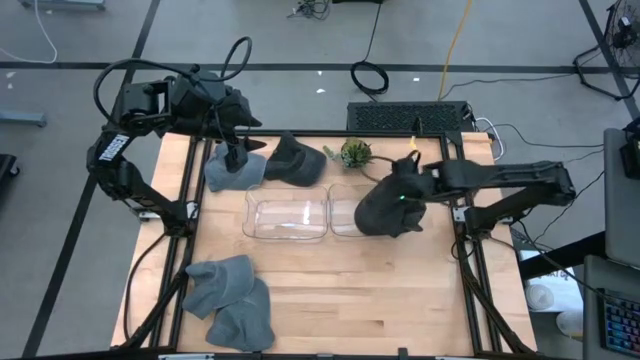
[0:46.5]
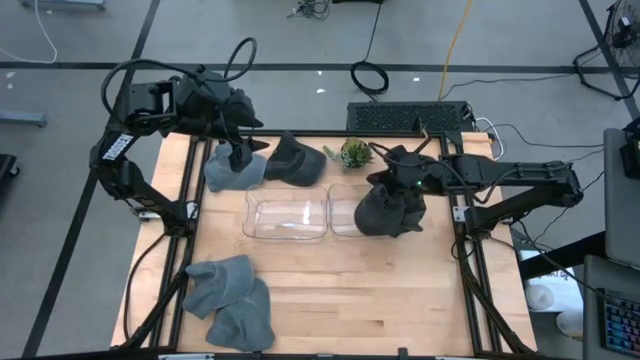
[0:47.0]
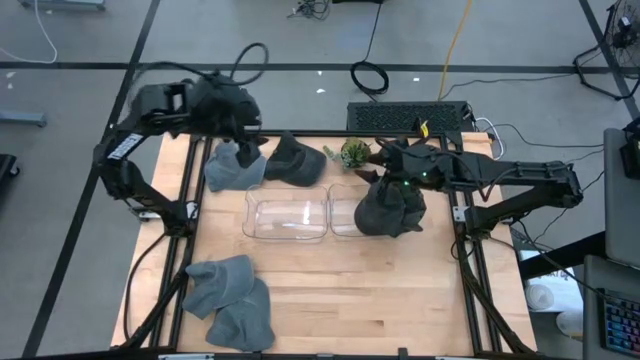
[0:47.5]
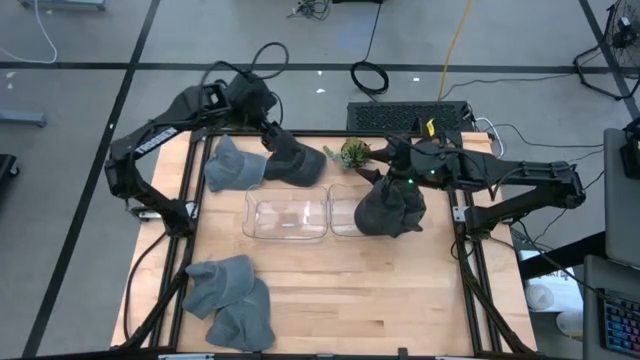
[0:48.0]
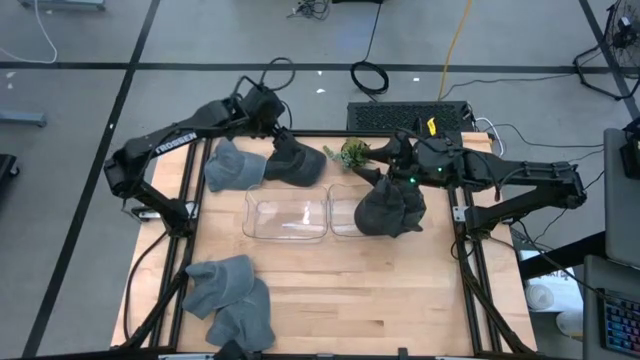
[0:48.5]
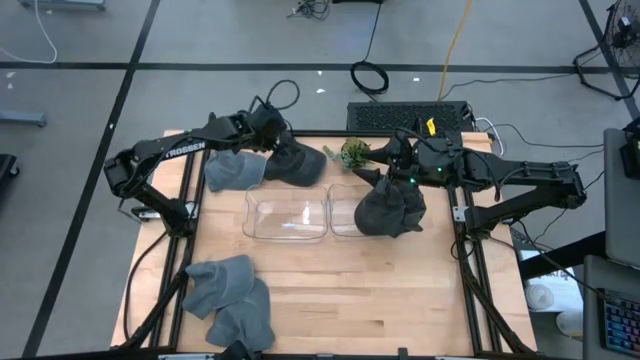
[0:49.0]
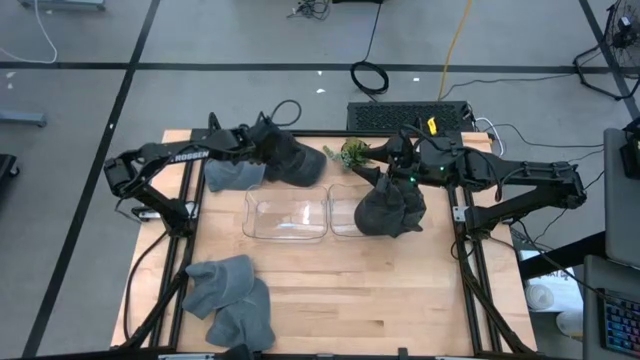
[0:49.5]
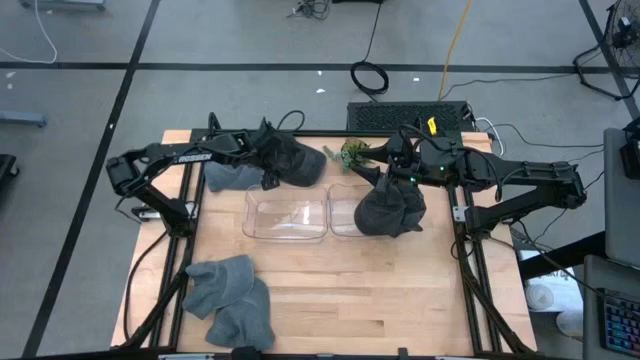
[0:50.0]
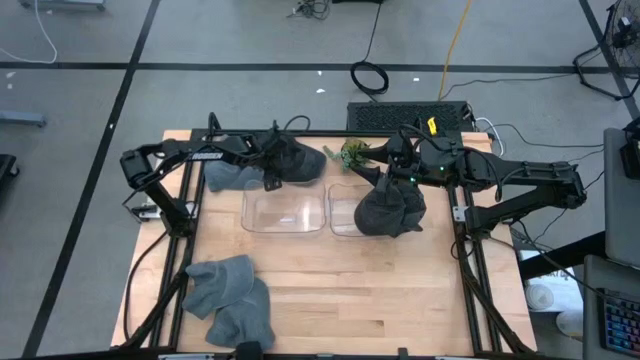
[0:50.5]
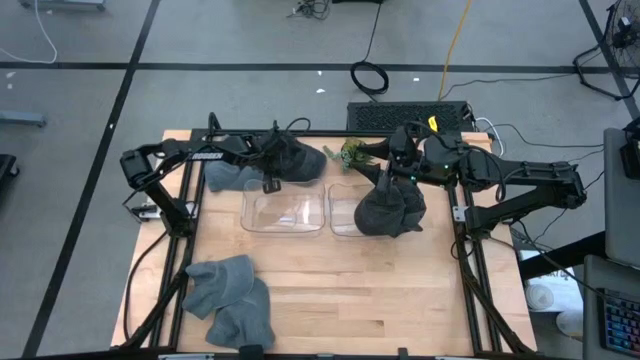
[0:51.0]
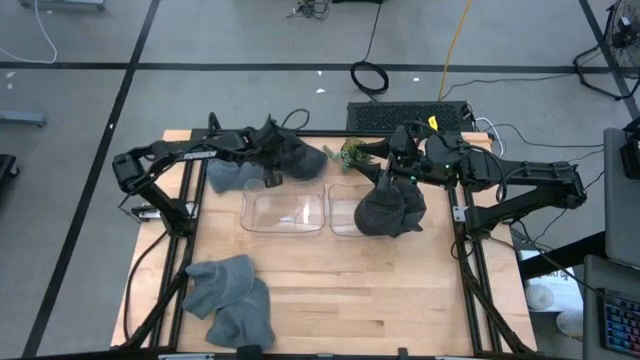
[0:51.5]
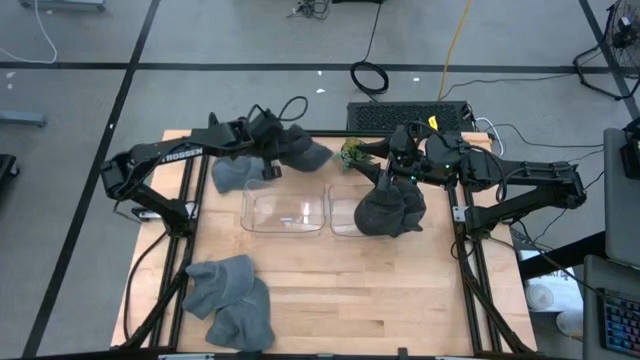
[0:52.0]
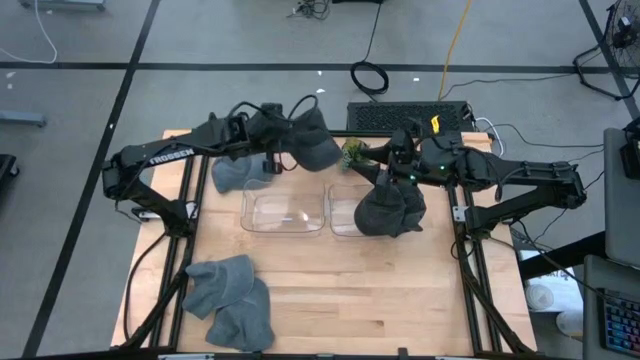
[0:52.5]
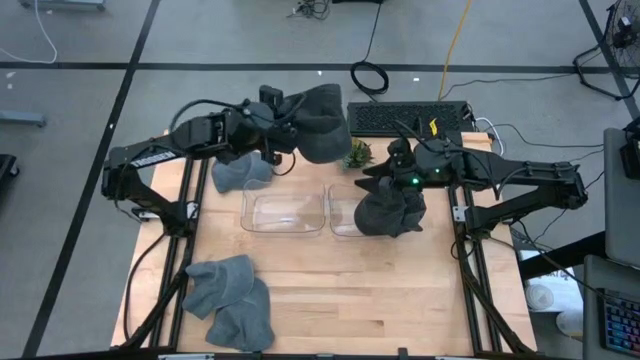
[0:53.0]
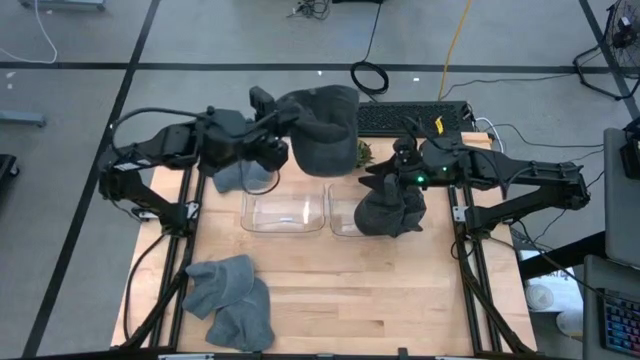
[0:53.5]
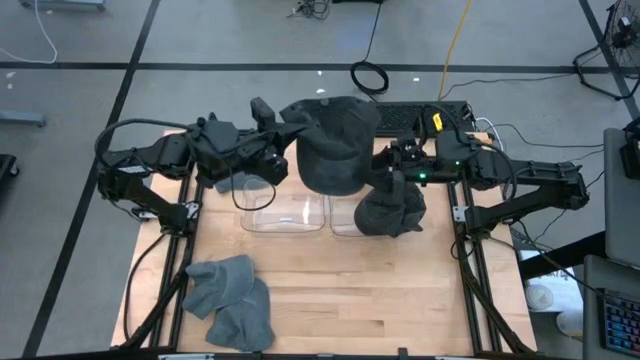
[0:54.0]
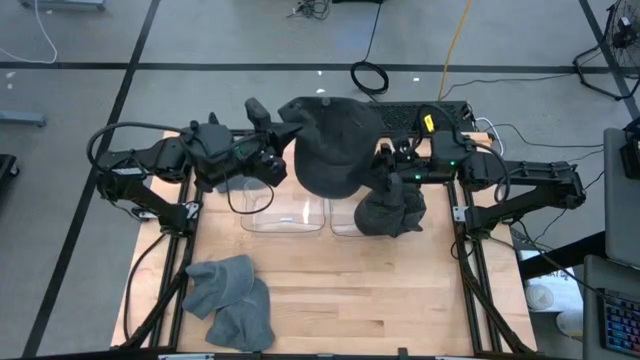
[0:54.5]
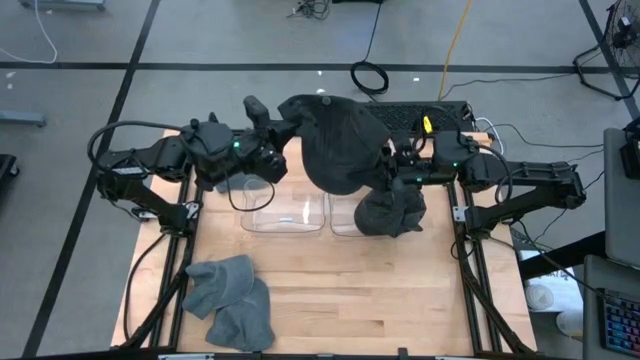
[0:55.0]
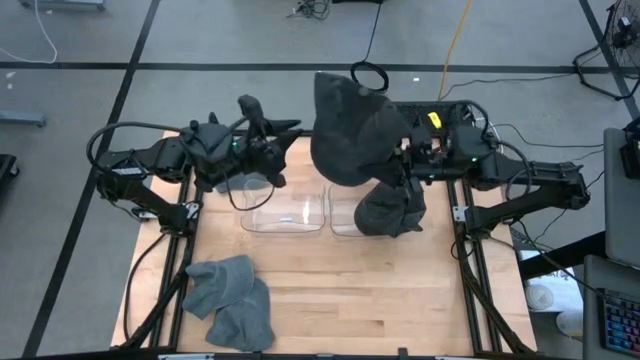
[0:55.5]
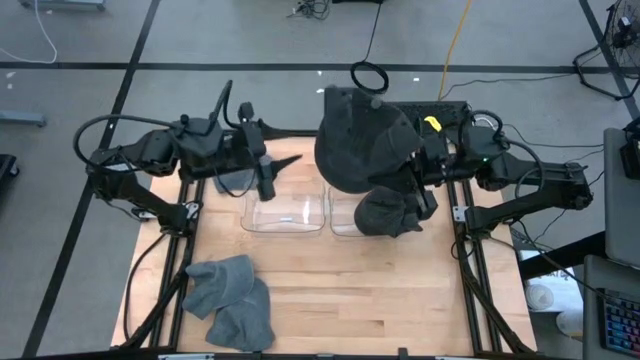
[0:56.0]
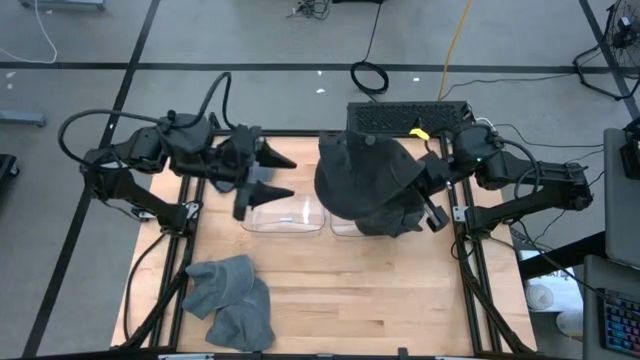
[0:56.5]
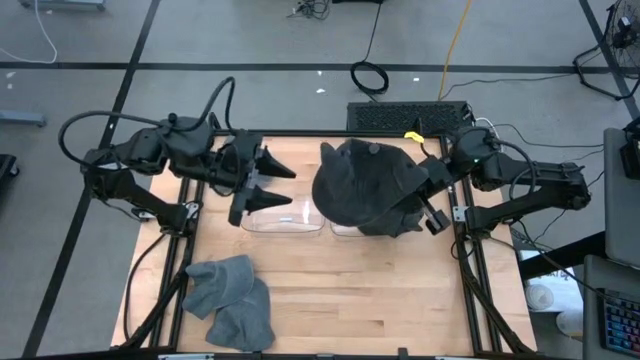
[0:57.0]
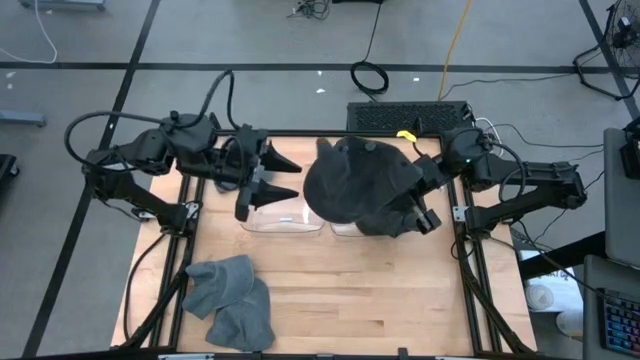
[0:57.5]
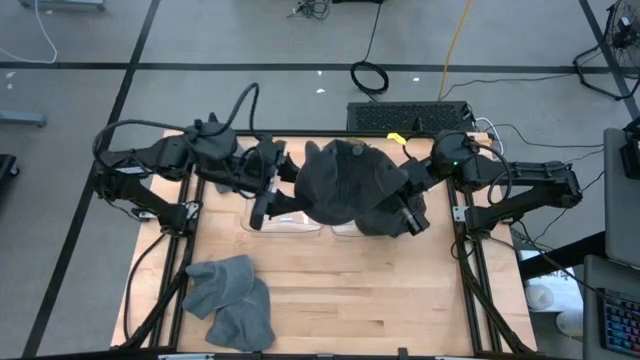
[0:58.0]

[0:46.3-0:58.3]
Task: Pick & Place hat
Put the black cap into the right transparent bin

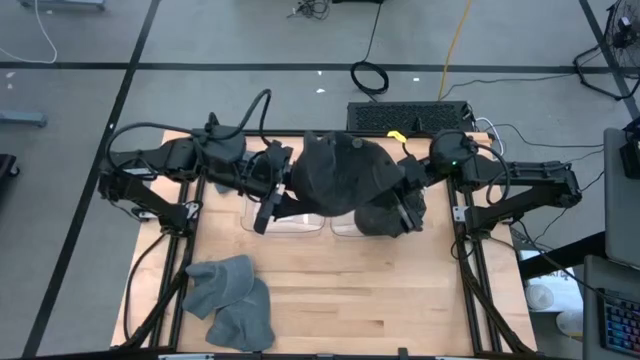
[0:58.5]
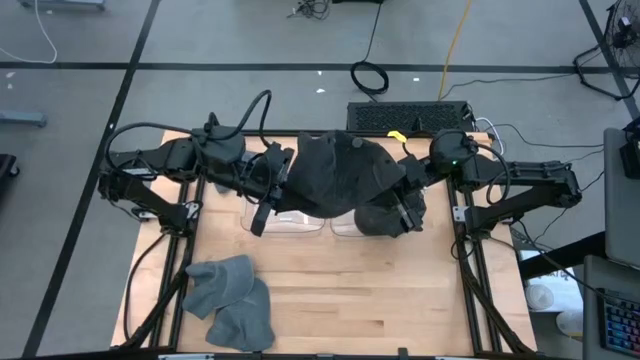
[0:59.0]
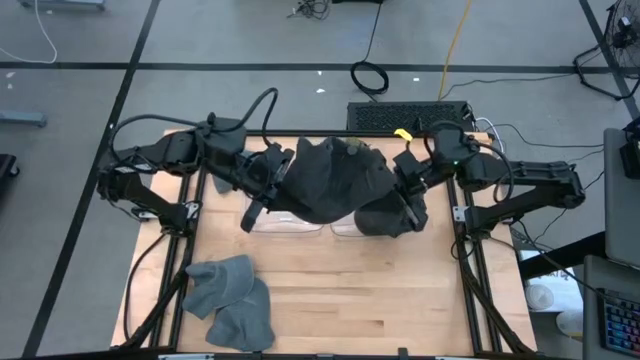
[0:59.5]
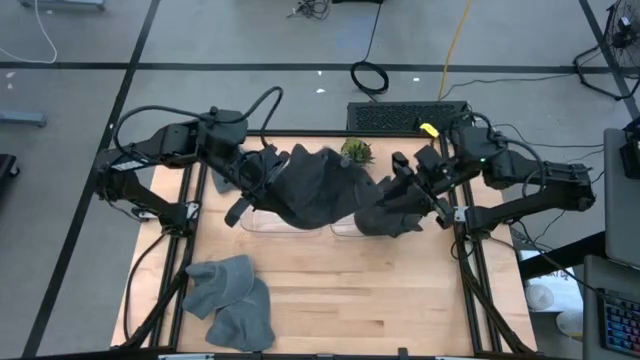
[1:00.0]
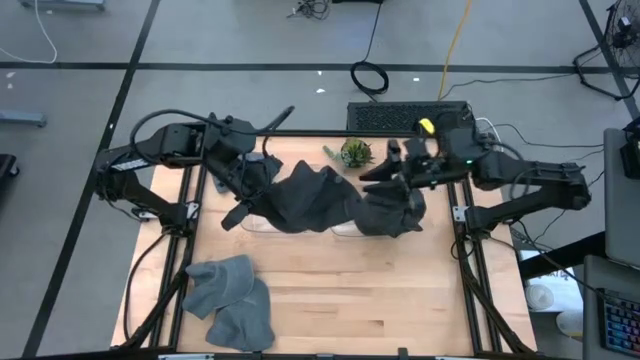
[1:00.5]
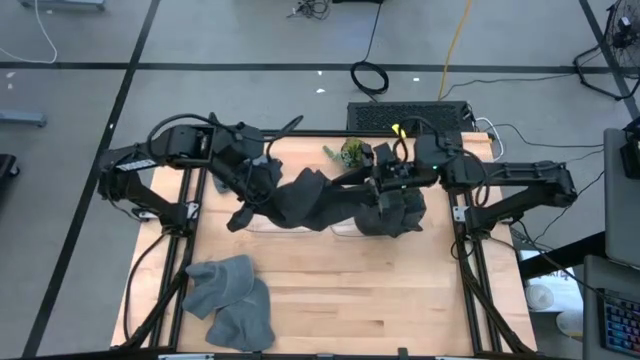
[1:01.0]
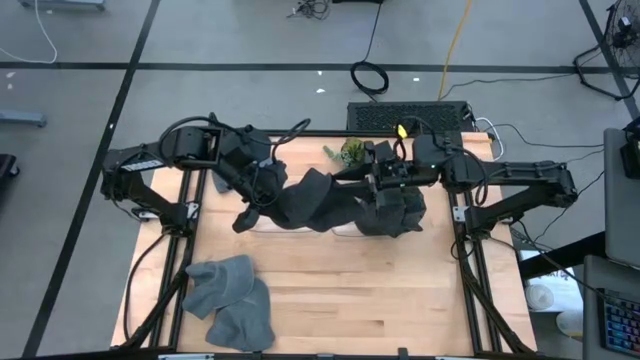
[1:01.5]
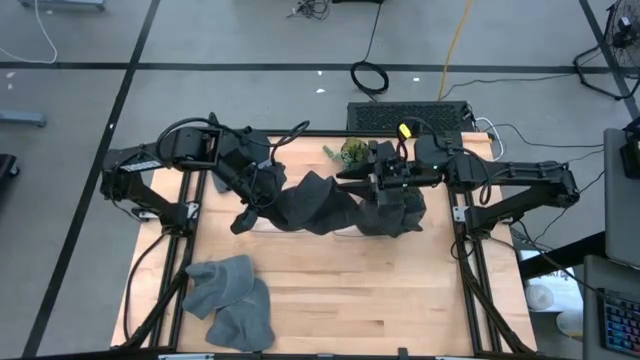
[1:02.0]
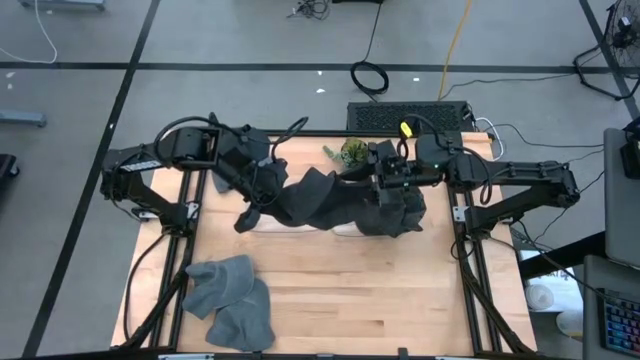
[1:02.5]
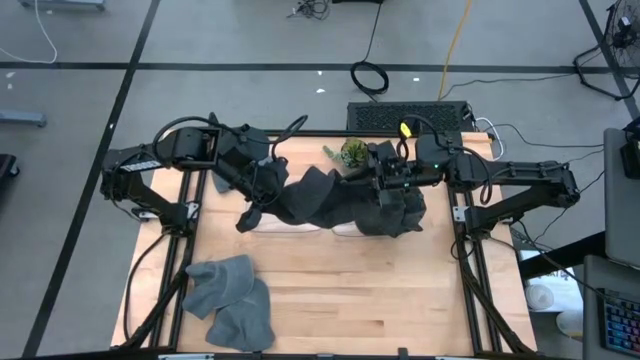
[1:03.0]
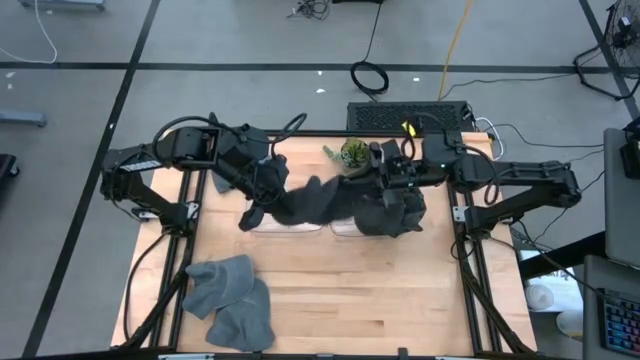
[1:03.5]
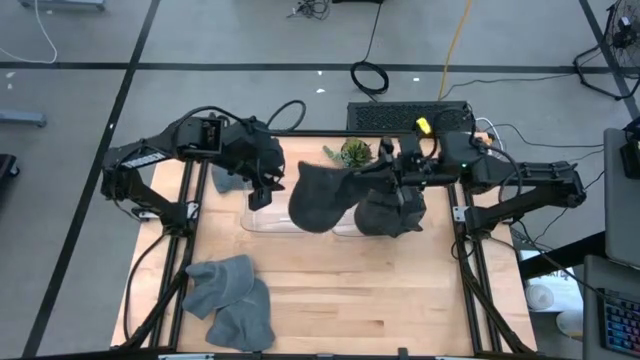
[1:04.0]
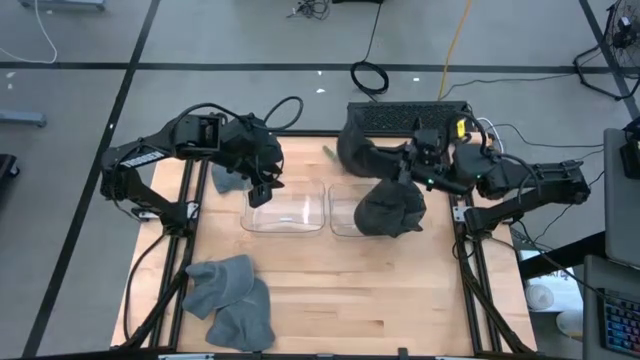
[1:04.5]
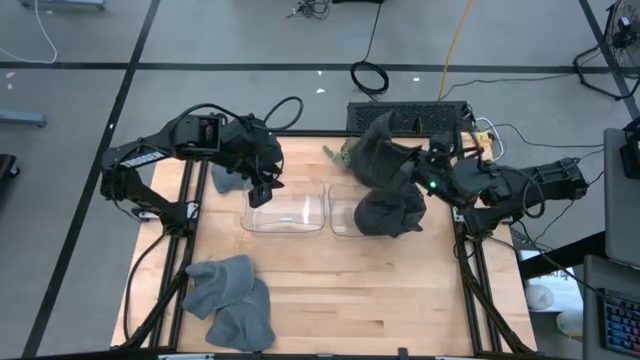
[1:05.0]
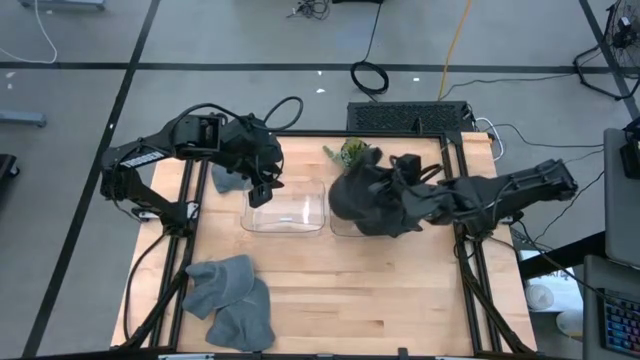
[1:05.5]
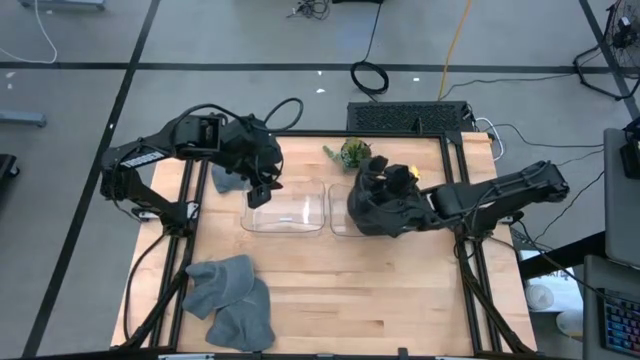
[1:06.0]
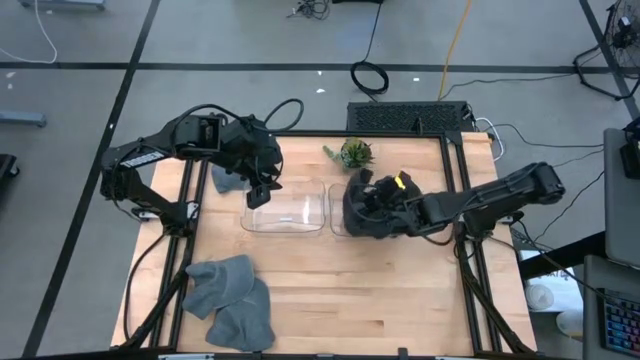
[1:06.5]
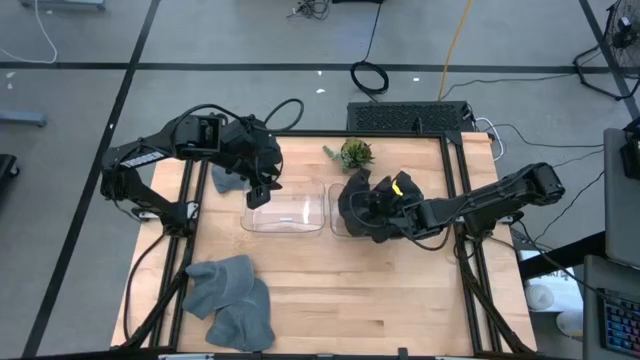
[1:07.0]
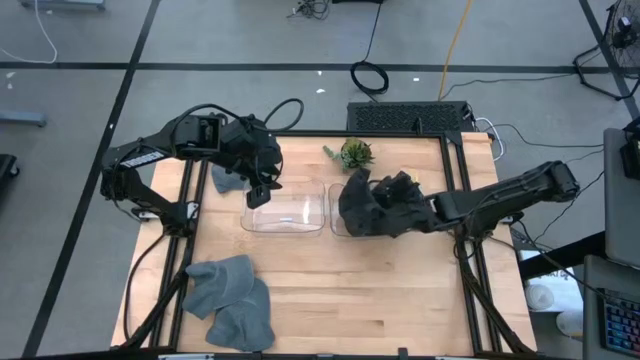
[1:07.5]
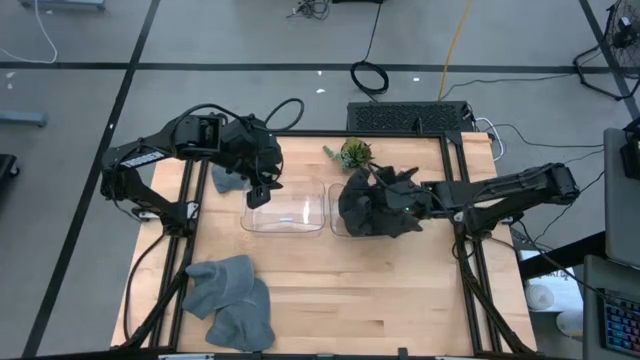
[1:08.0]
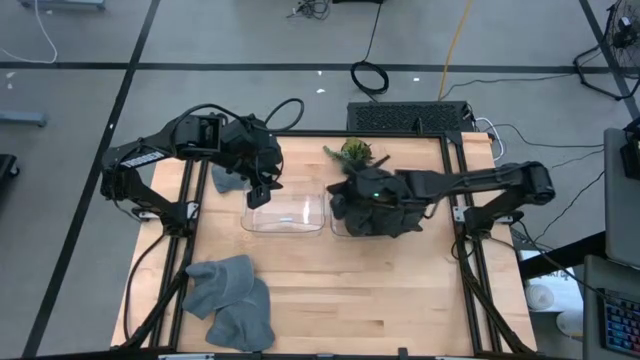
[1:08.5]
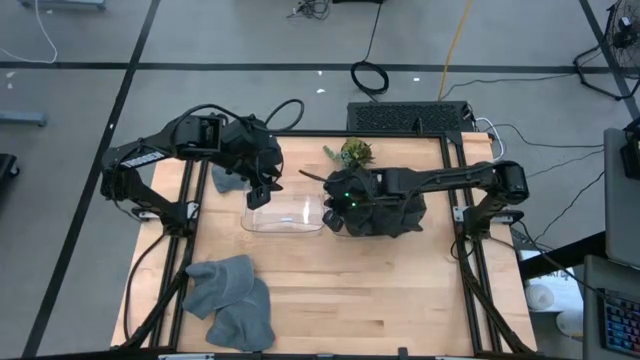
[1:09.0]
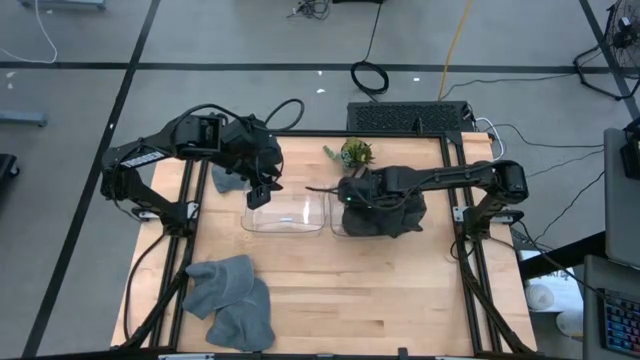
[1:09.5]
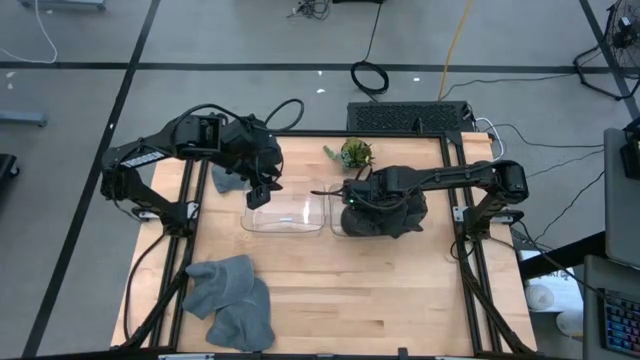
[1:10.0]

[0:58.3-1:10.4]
Put the black cap into the right transparent bin
